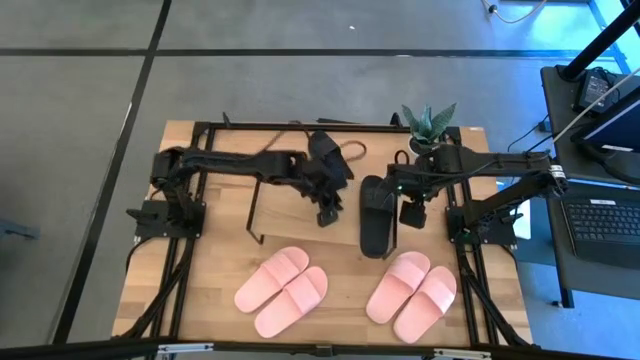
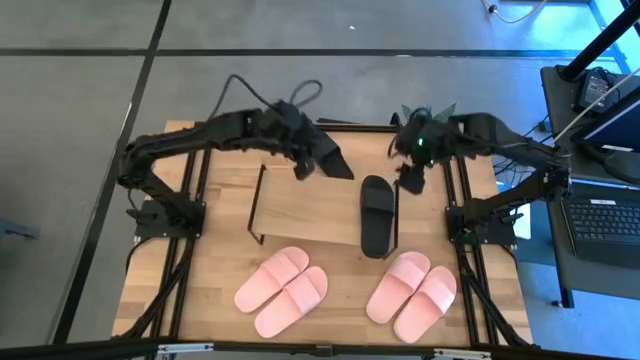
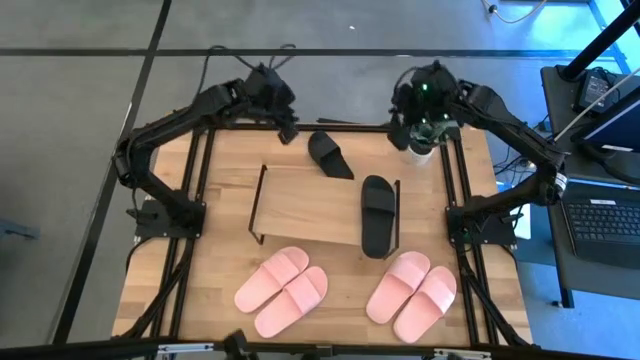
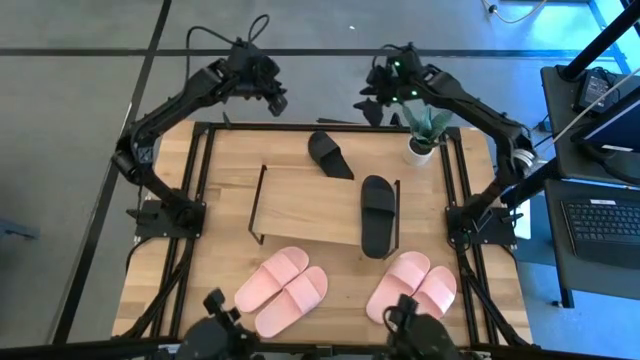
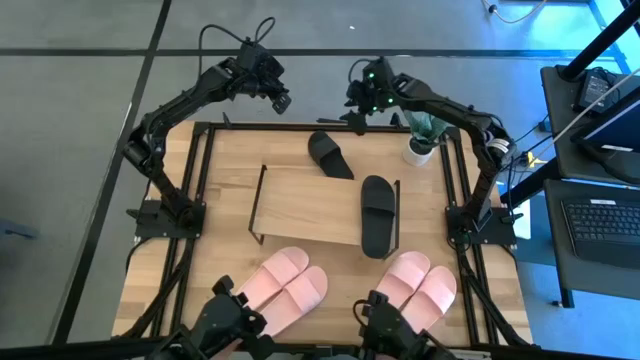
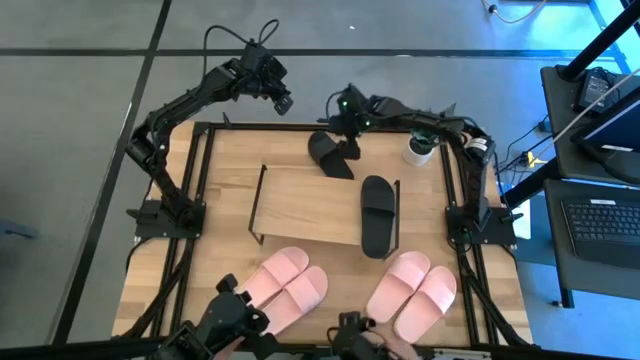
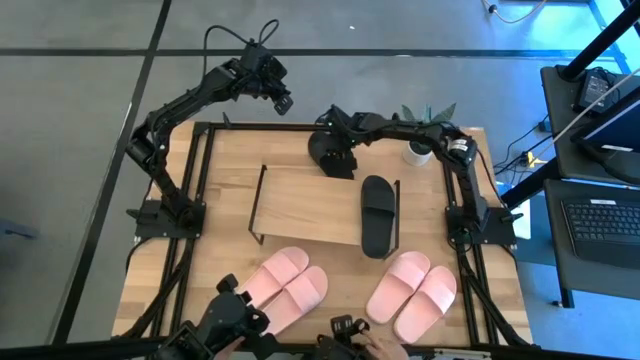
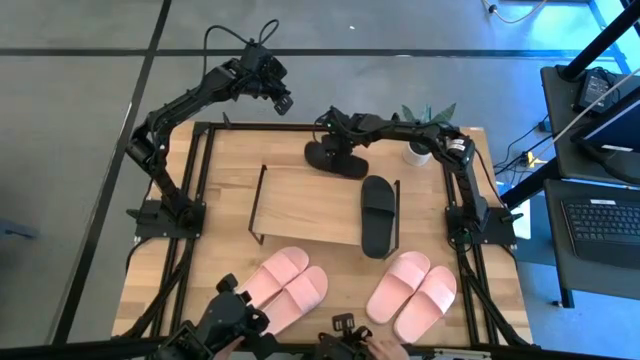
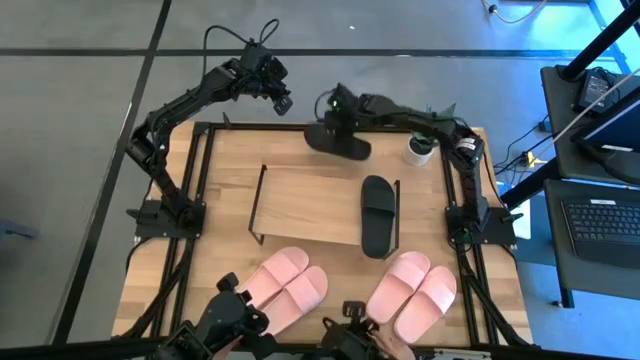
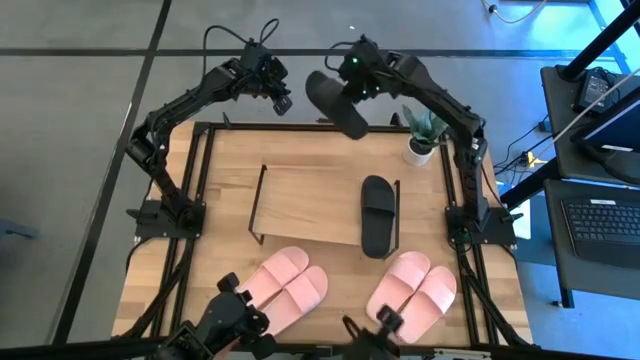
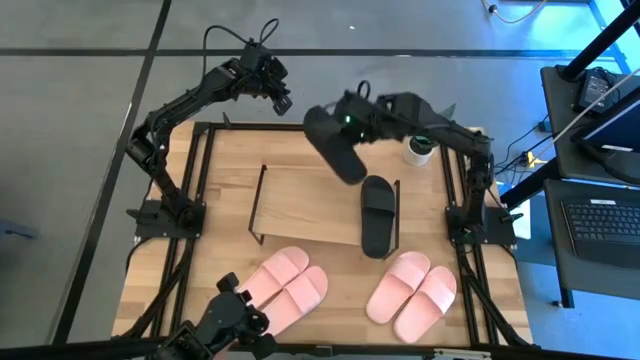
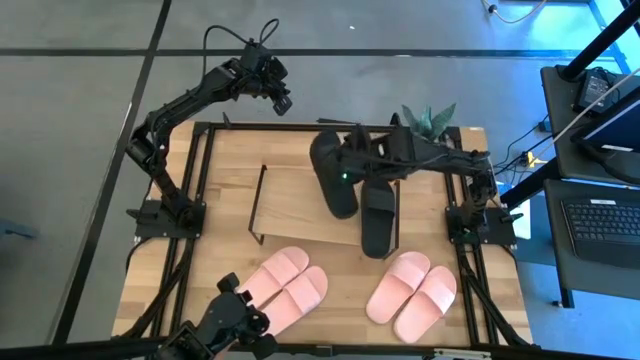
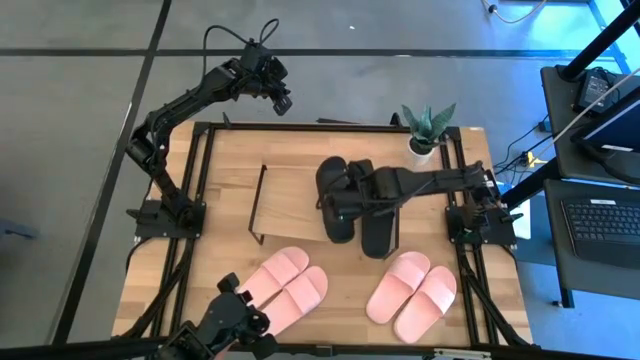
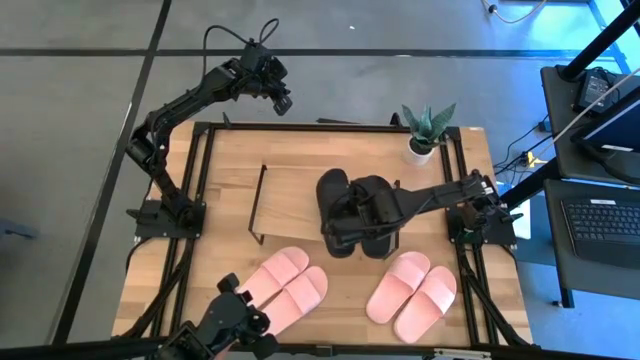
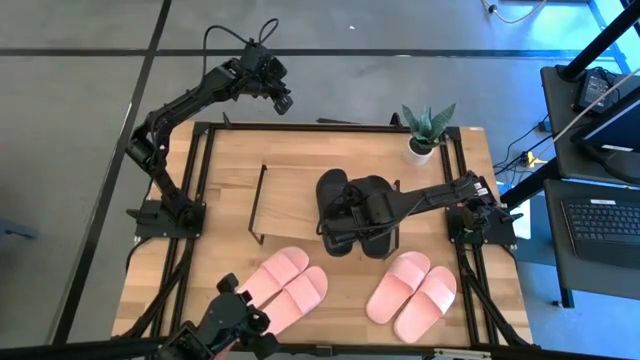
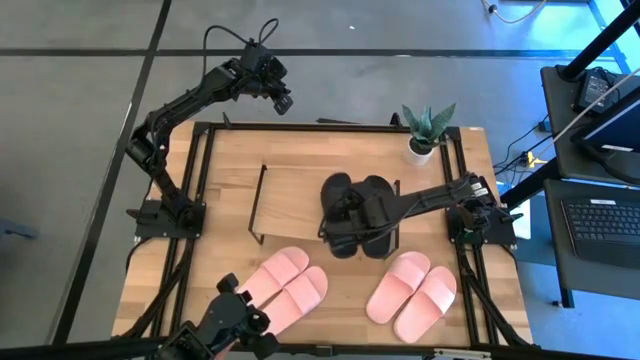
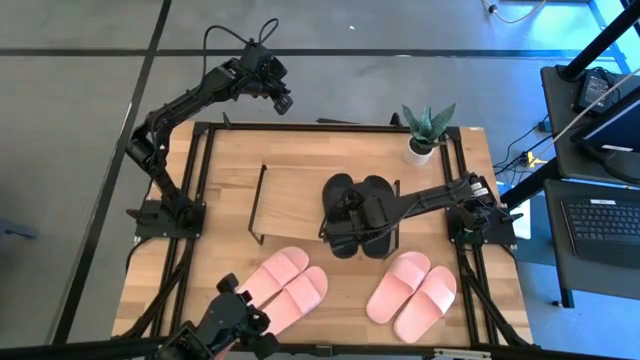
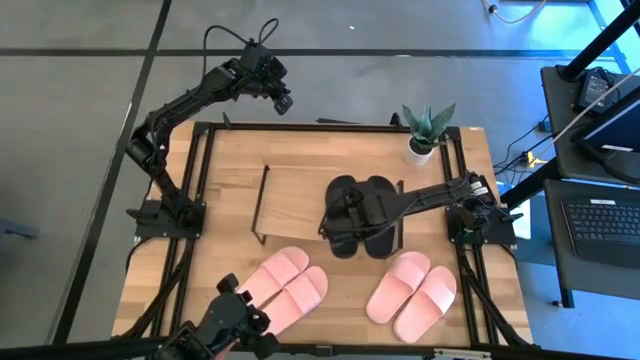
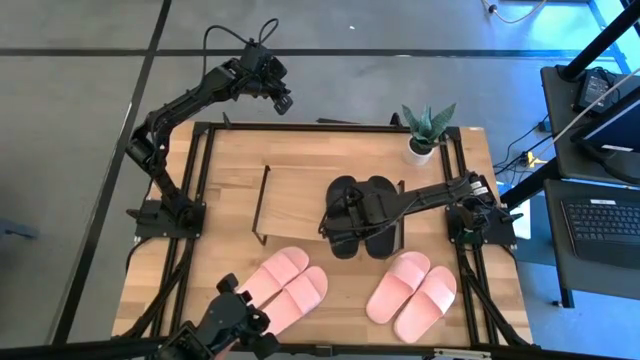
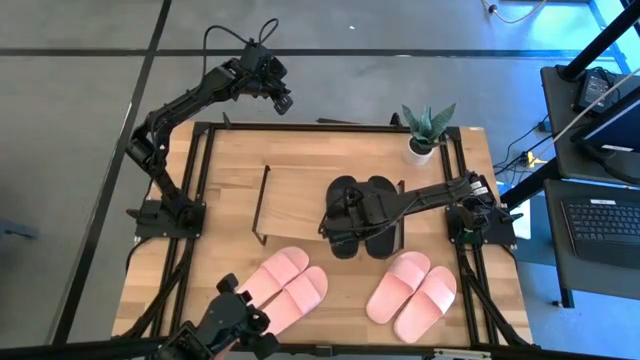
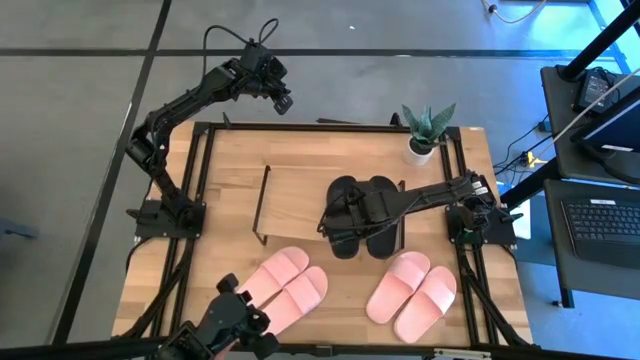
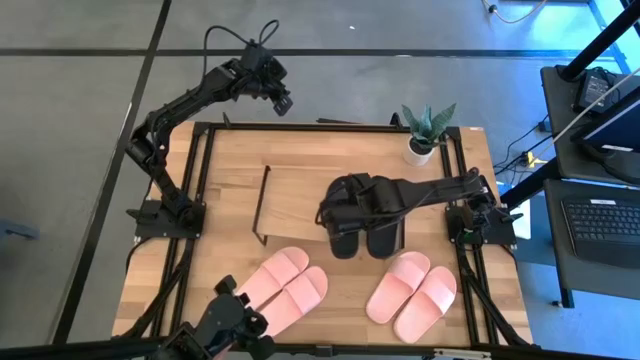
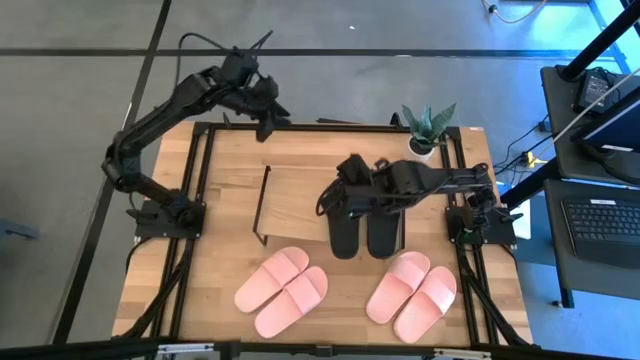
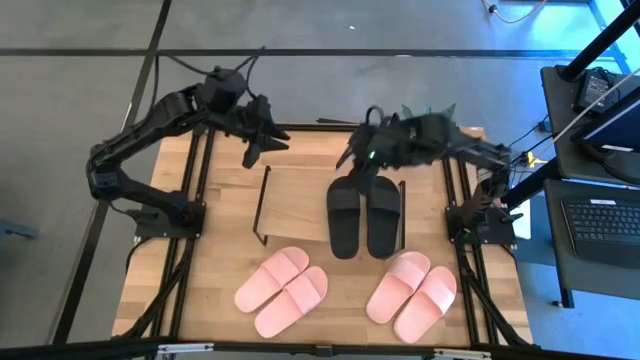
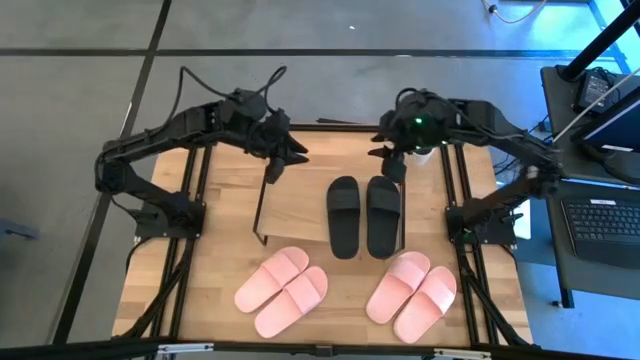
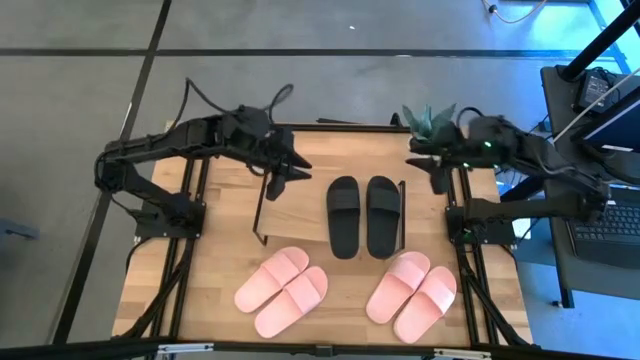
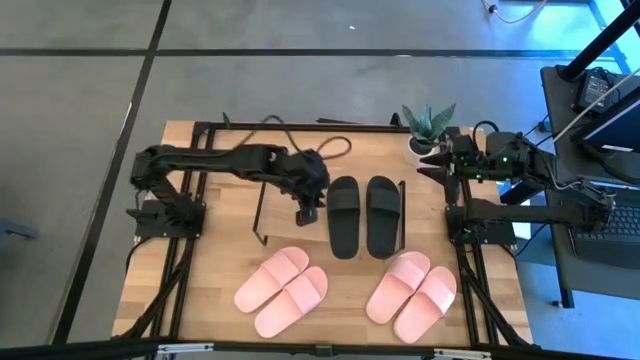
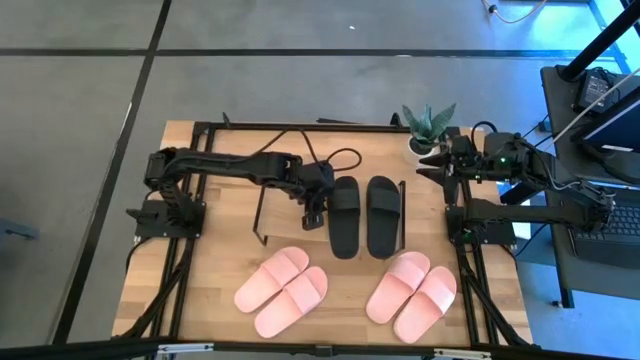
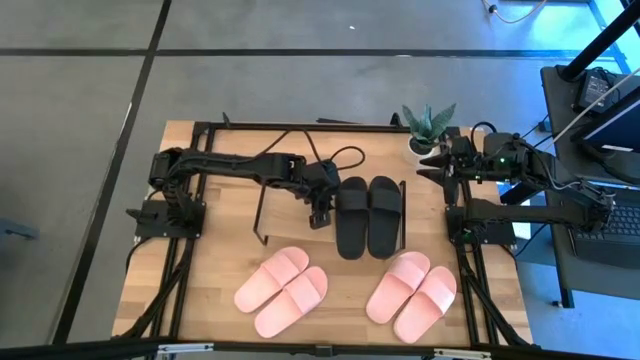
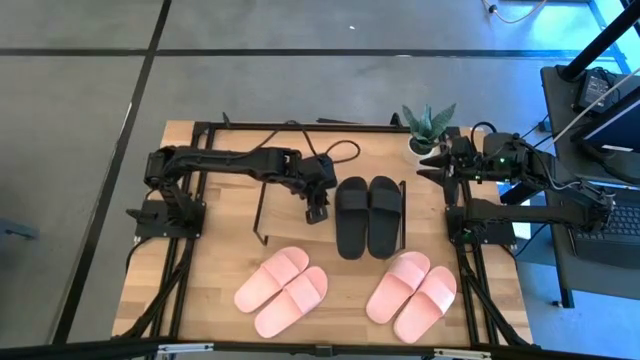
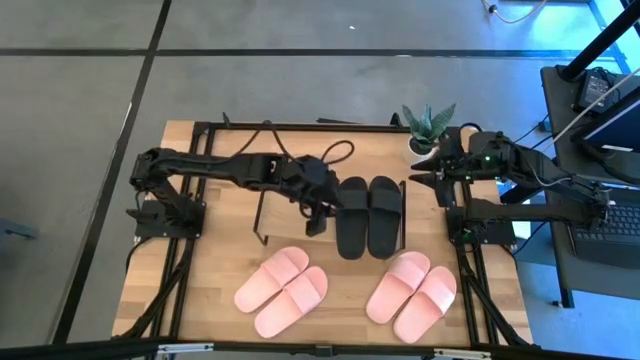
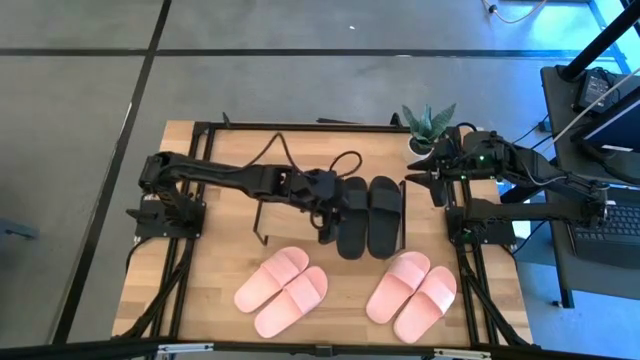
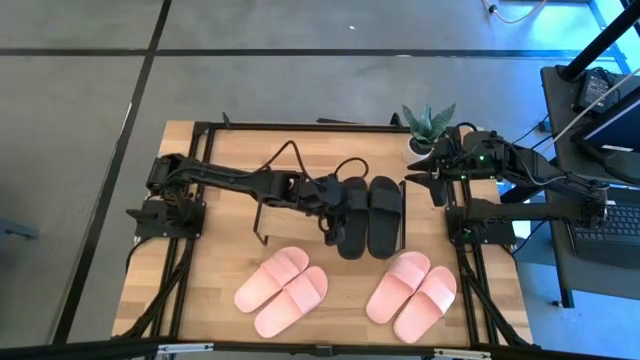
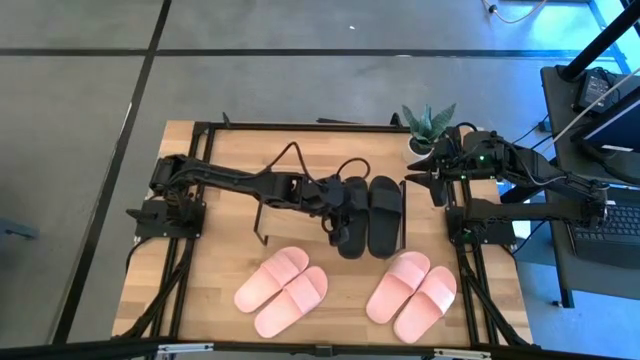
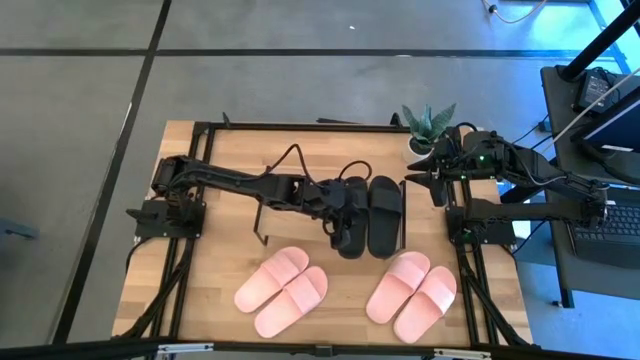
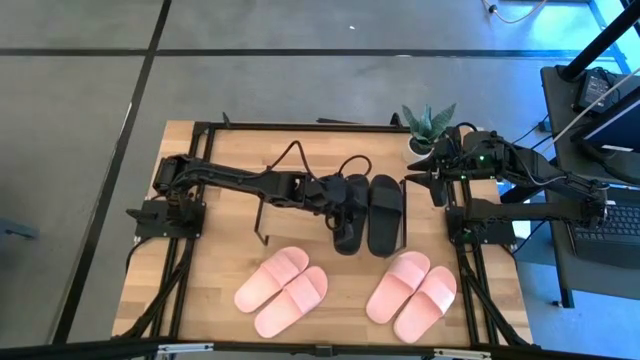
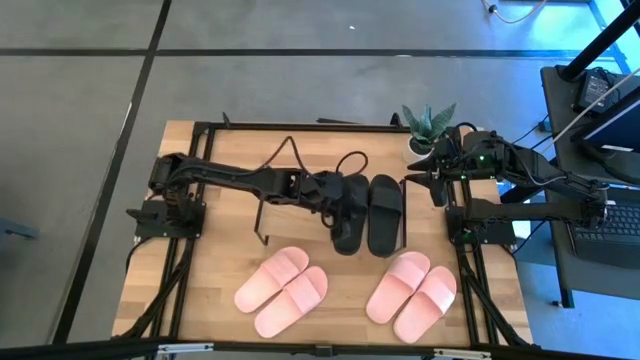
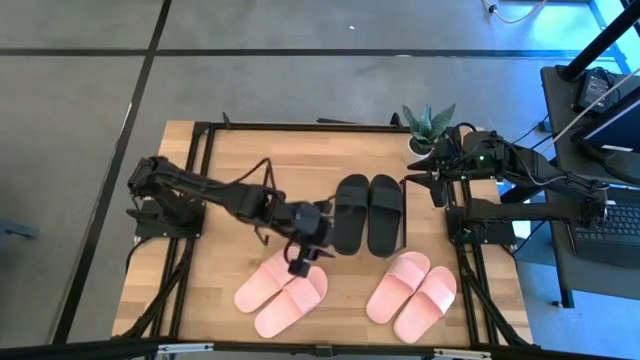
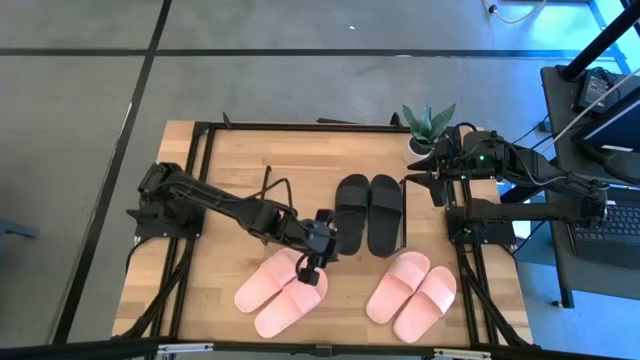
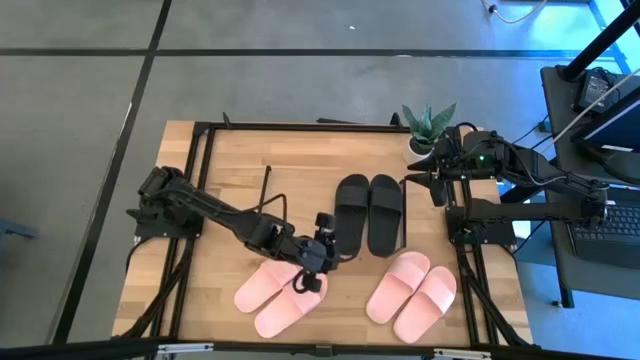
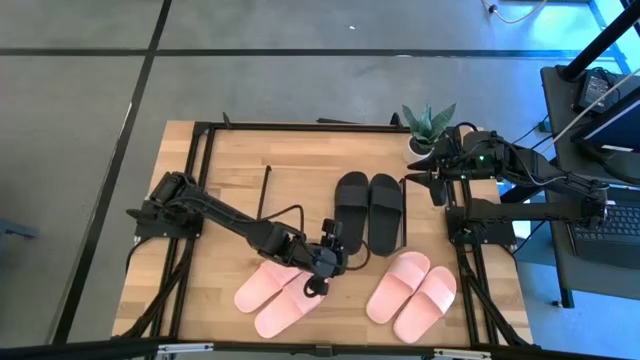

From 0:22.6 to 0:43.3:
Task: Pick and place slides into the shelf
Put the black slides on the shelf
